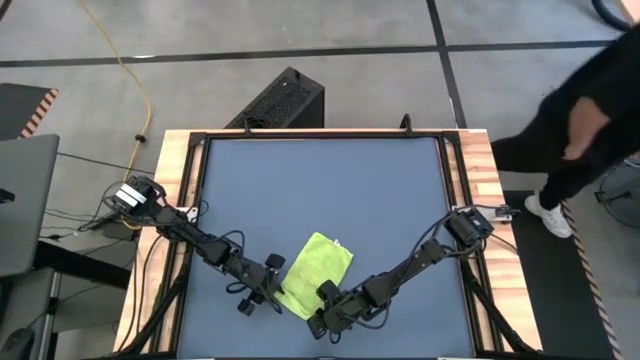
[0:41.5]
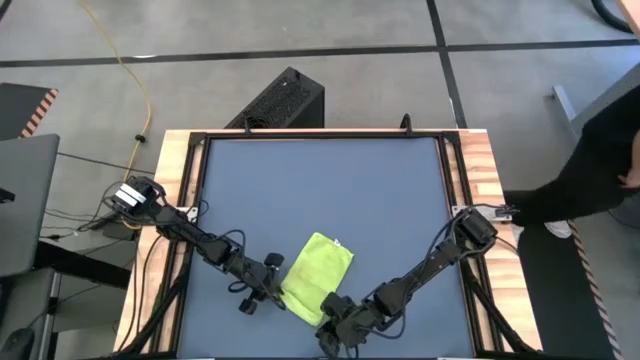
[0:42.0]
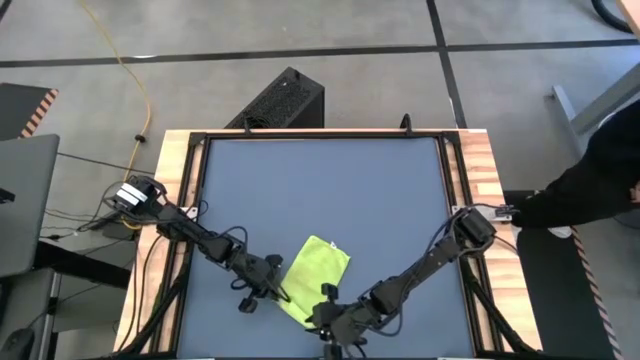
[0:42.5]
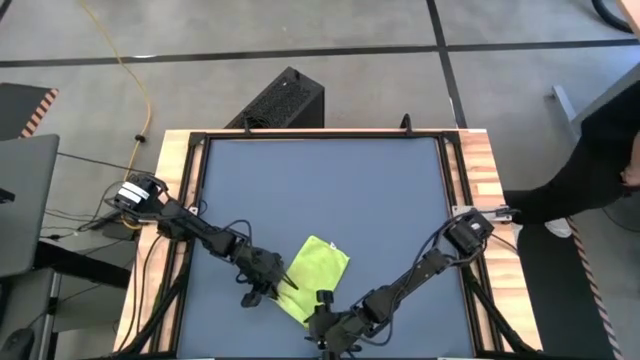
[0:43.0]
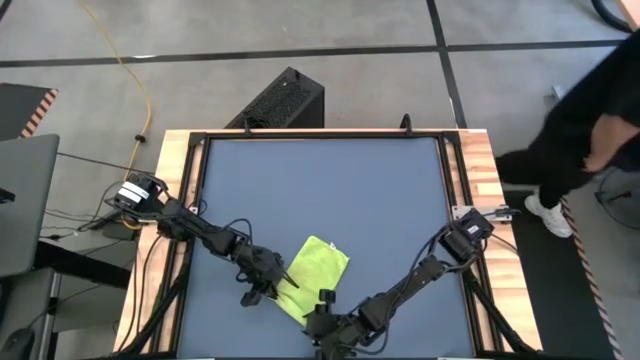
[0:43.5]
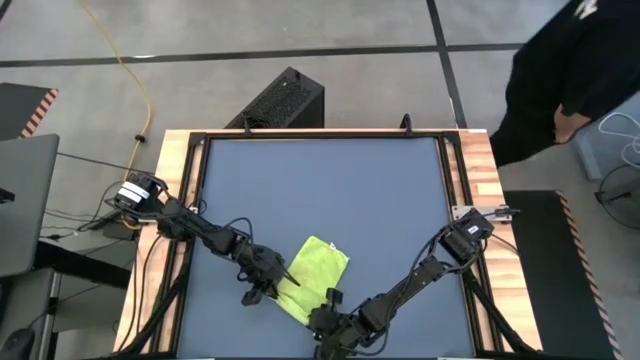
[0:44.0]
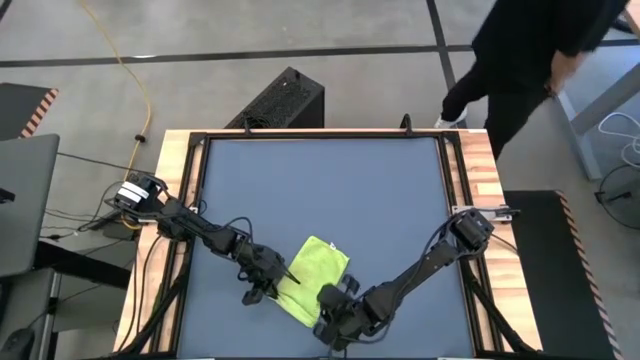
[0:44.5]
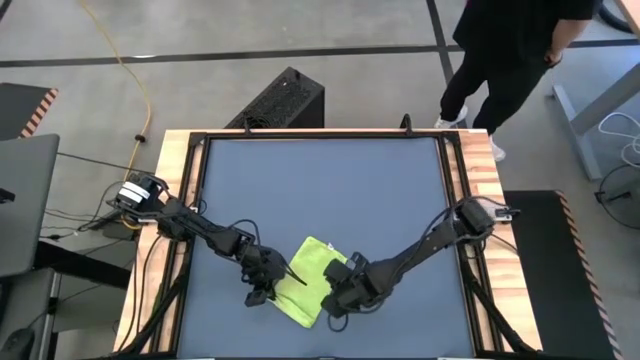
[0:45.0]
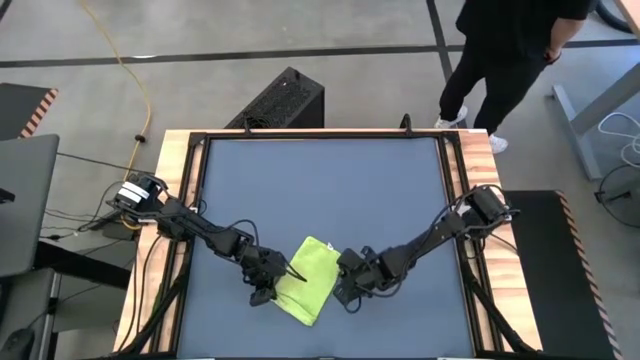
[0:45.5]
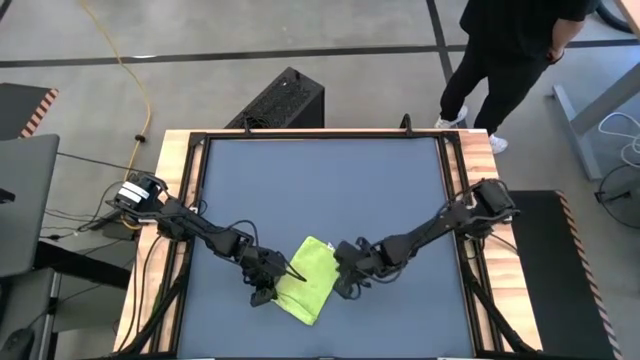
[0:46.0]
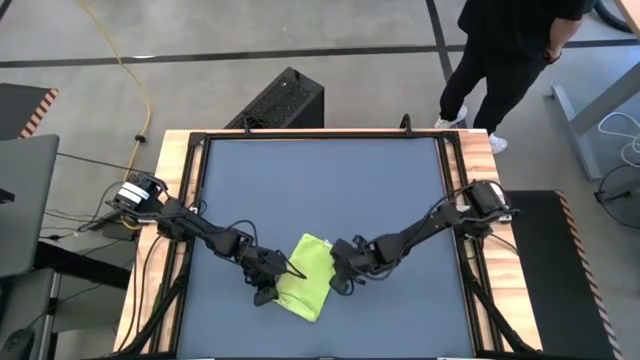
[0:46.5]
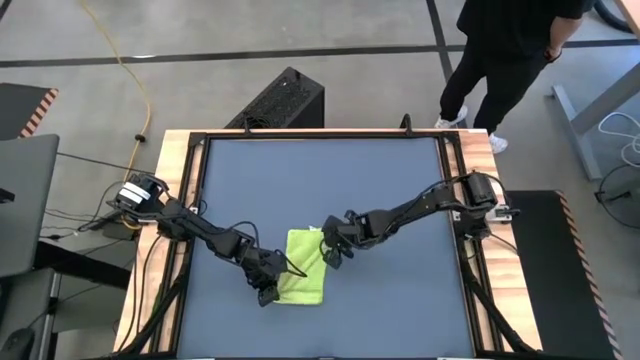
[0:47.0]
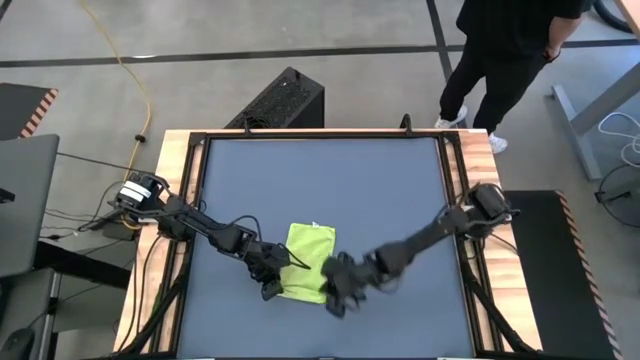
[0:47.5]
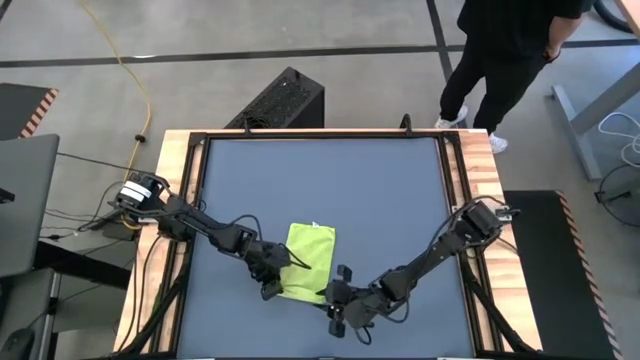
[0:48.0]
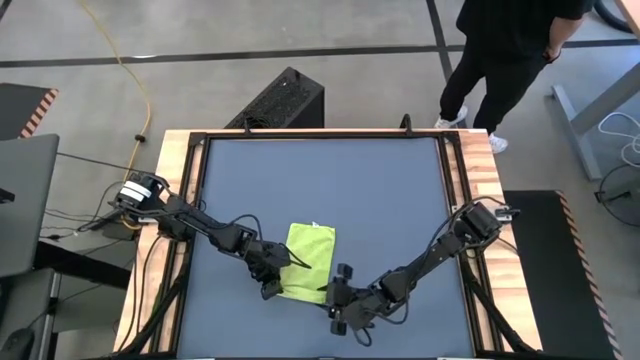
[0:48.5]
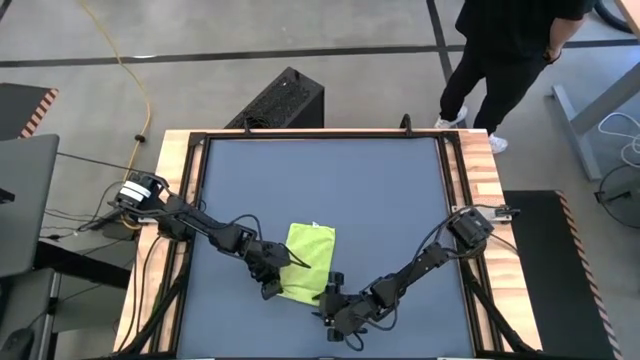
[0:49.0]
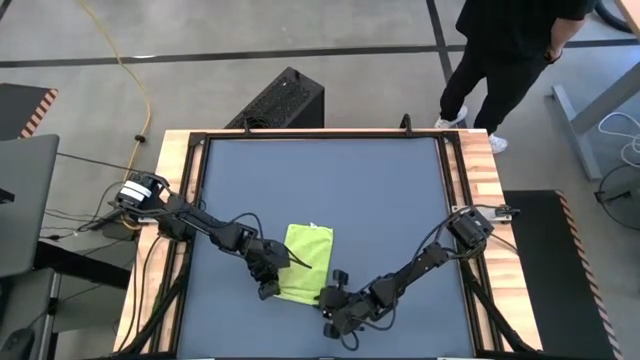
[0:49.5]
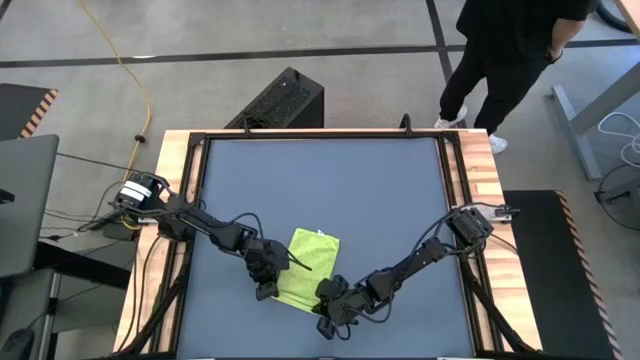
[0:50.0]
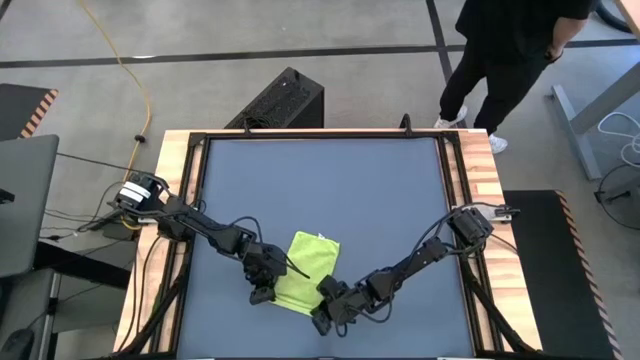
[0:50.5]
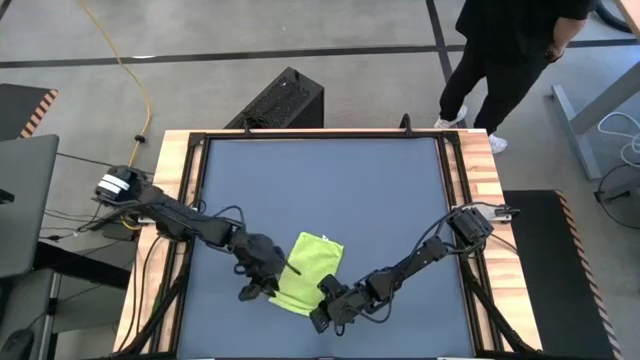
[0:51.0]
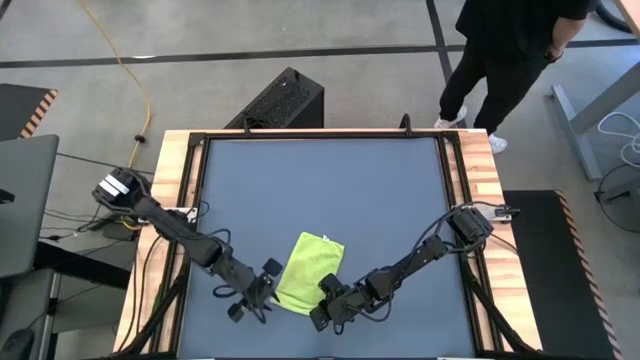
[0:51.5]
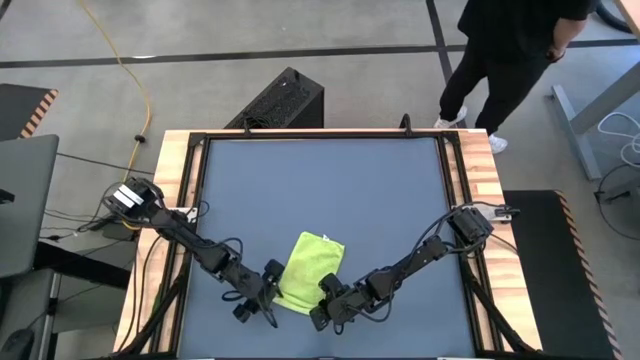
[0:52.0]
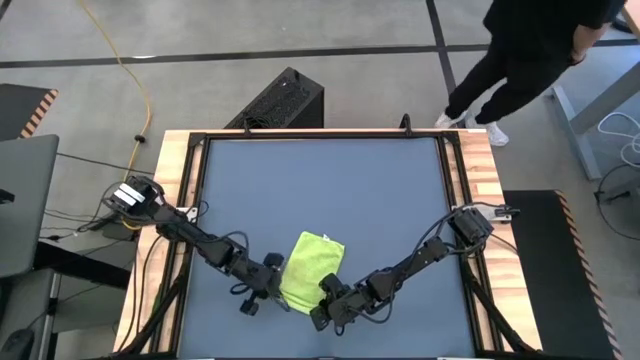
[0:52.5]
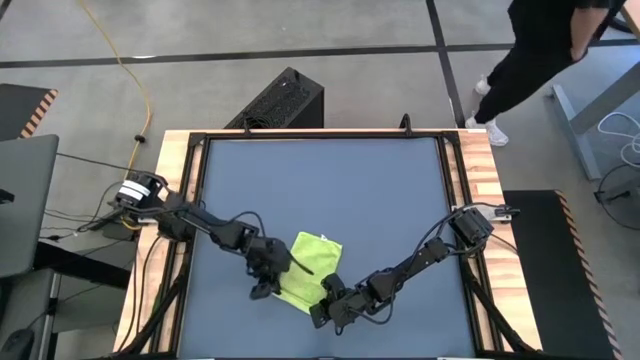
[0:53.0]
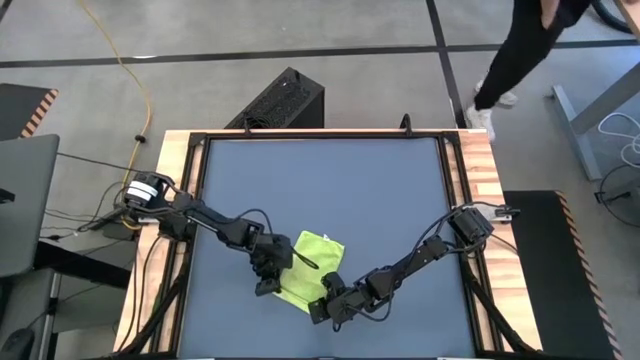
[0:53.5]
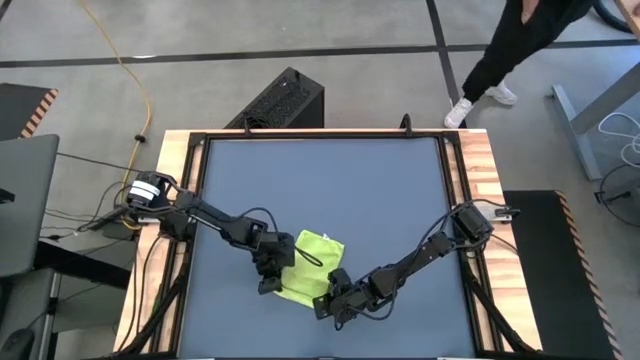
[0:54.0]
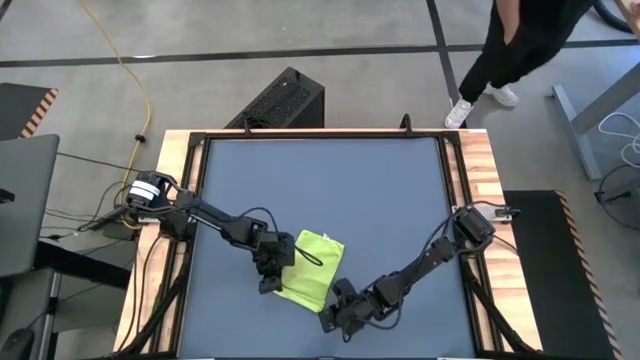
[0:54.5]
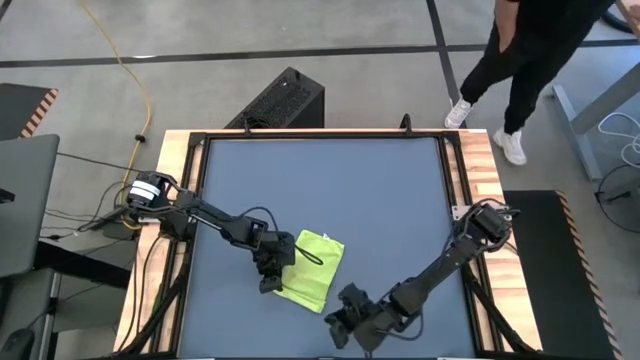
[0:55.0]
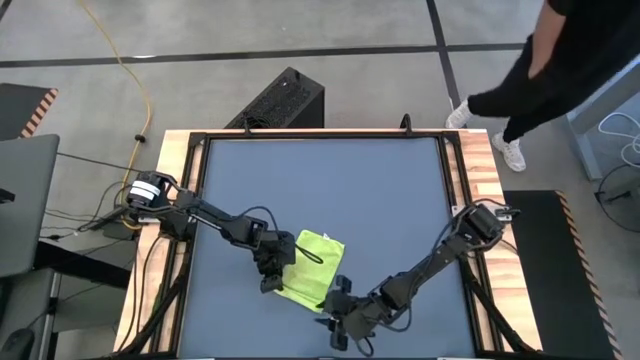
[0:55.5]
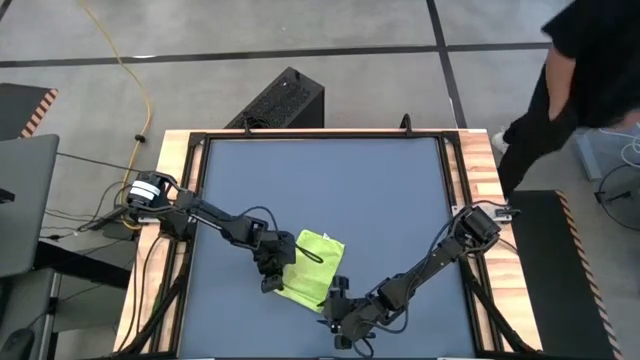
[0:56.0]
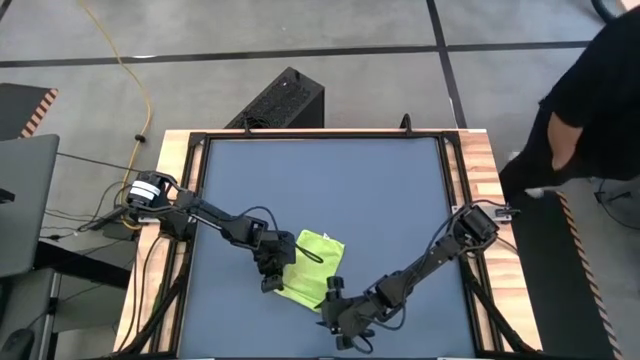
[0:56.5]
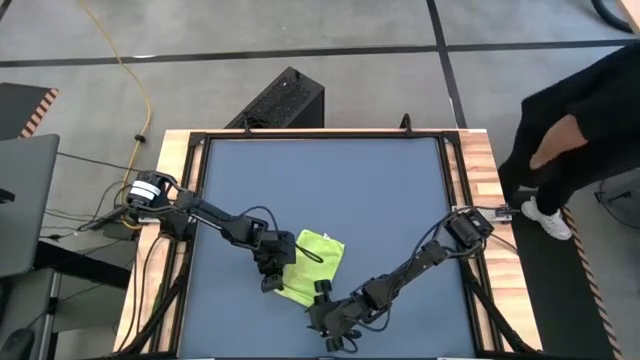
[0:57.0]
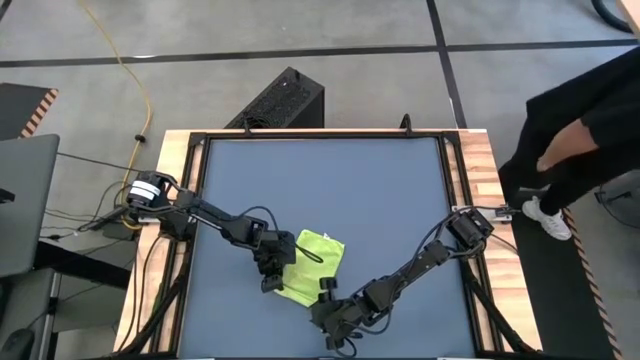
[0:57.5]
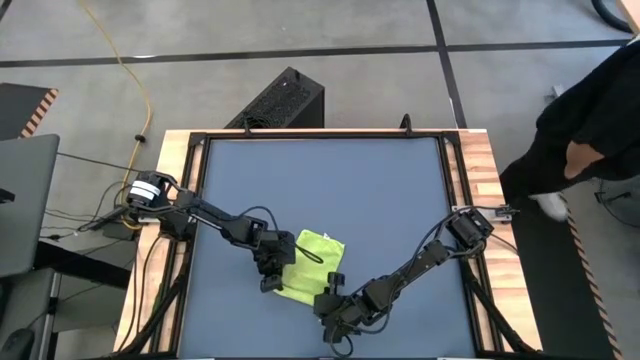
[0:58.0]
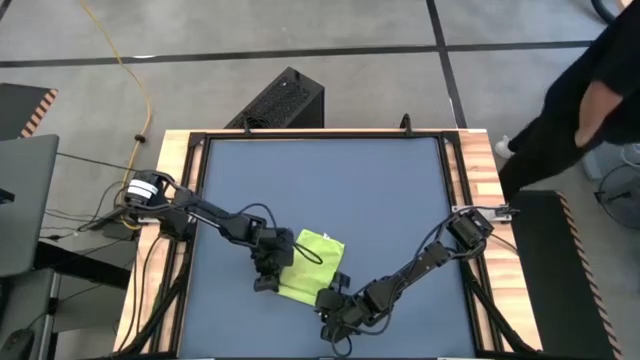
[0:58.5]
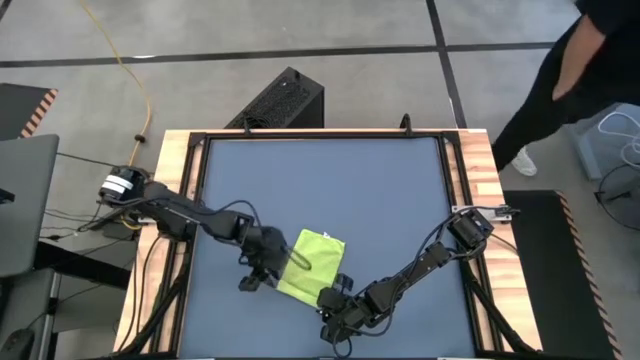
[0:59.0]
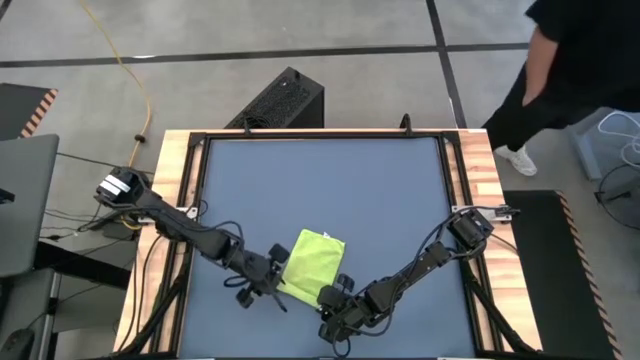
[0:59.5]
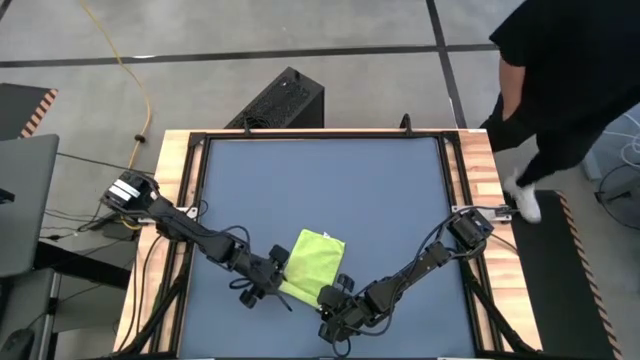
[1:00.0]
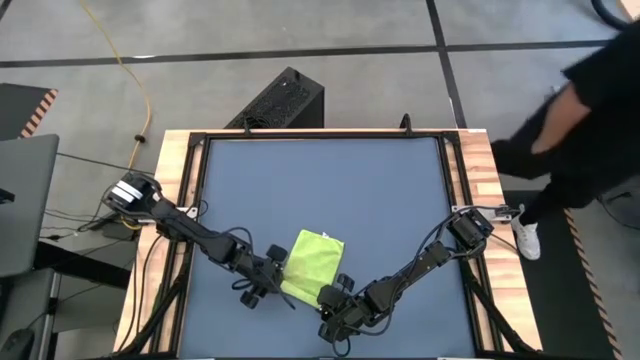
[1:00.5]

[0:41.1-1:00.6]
Task: Roll towel
Roll the green towel
